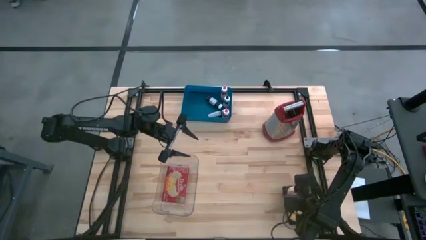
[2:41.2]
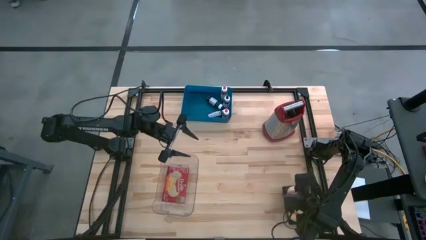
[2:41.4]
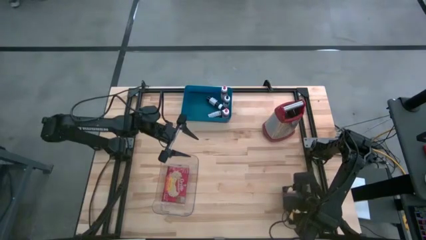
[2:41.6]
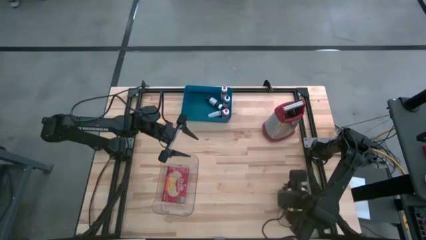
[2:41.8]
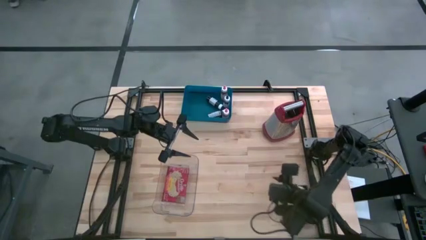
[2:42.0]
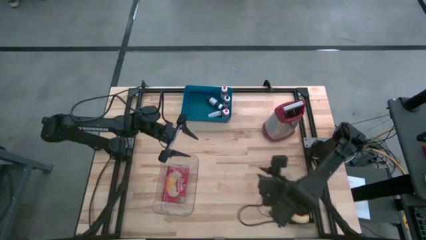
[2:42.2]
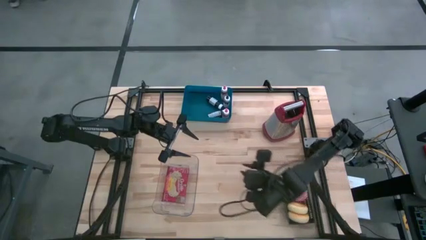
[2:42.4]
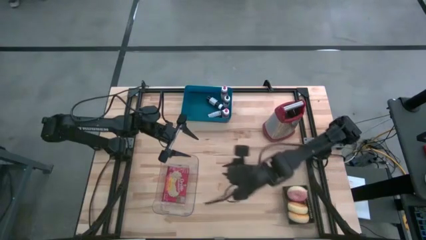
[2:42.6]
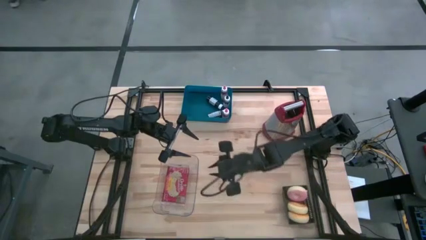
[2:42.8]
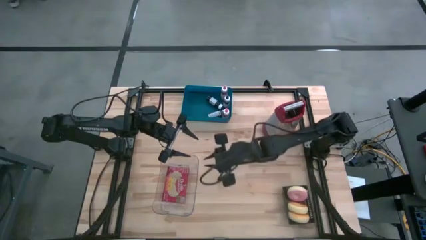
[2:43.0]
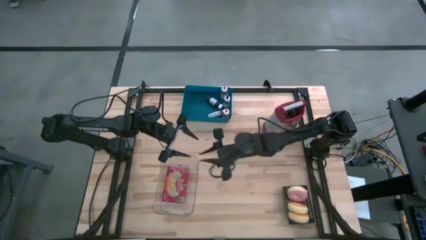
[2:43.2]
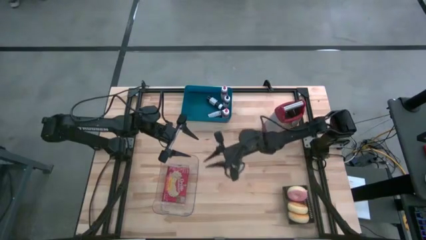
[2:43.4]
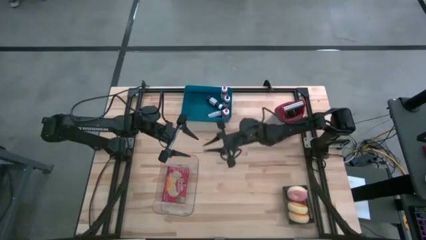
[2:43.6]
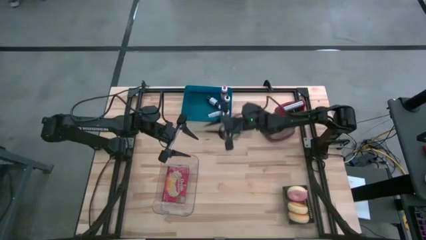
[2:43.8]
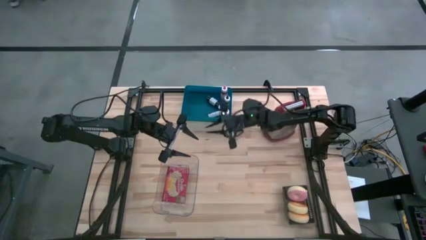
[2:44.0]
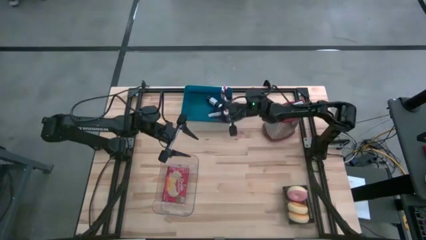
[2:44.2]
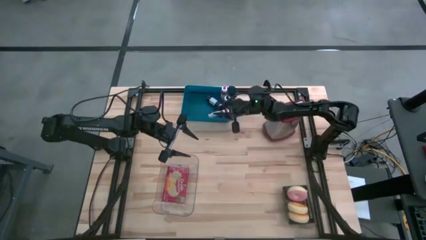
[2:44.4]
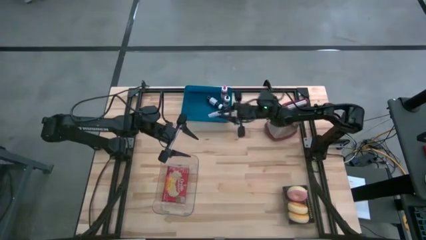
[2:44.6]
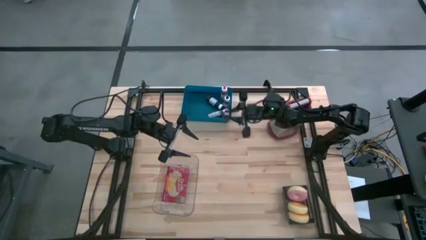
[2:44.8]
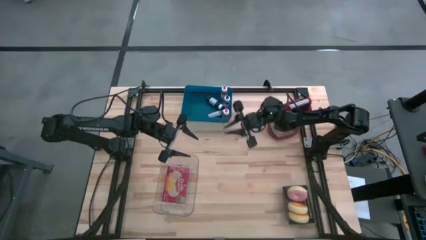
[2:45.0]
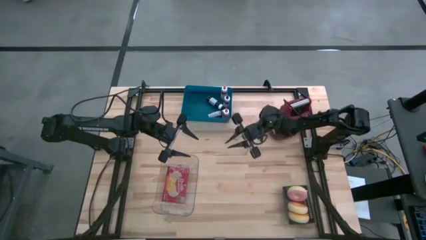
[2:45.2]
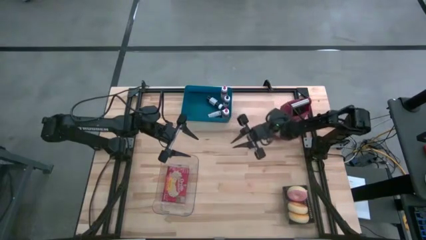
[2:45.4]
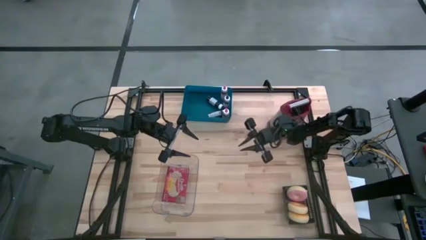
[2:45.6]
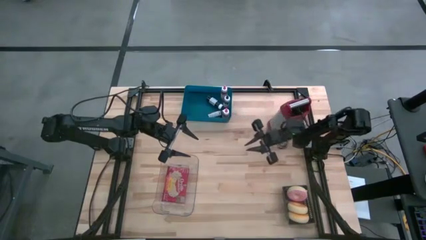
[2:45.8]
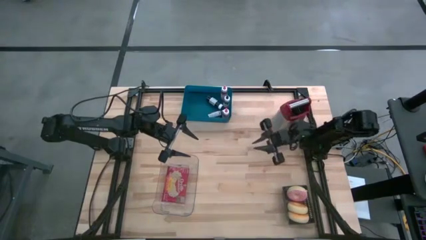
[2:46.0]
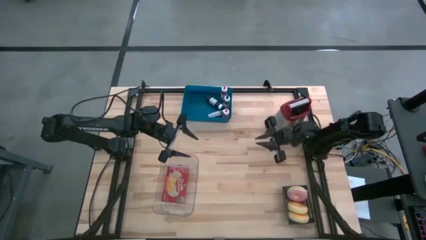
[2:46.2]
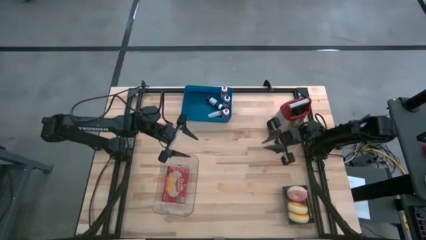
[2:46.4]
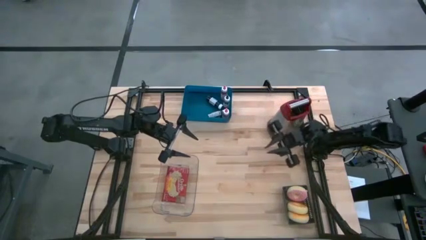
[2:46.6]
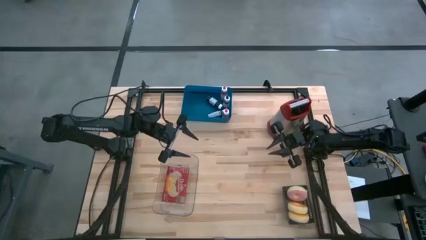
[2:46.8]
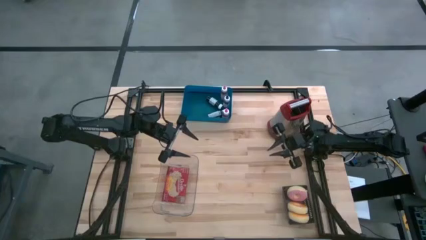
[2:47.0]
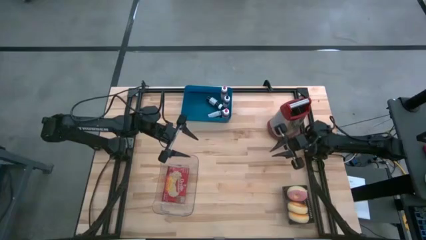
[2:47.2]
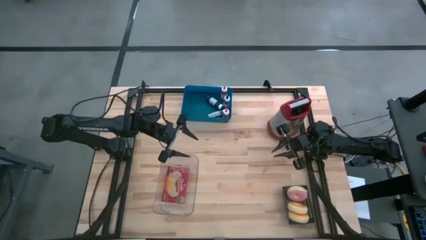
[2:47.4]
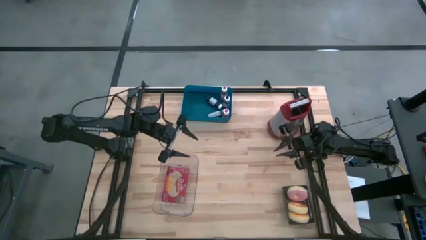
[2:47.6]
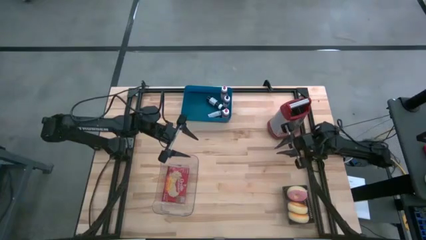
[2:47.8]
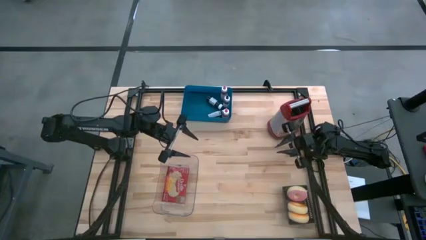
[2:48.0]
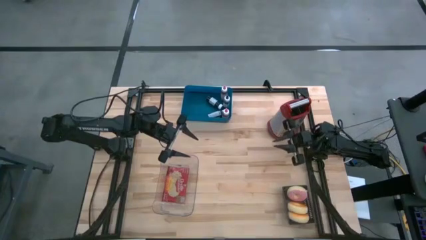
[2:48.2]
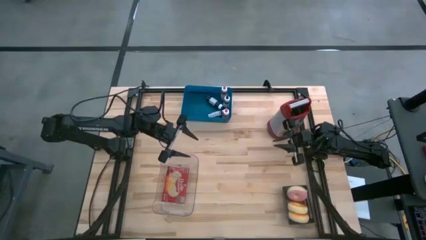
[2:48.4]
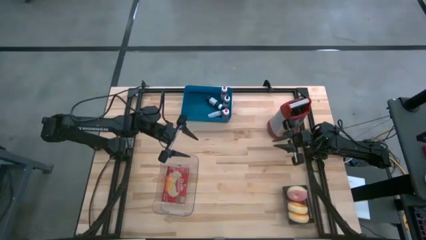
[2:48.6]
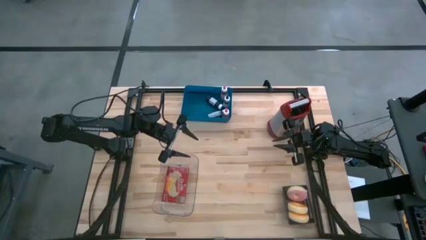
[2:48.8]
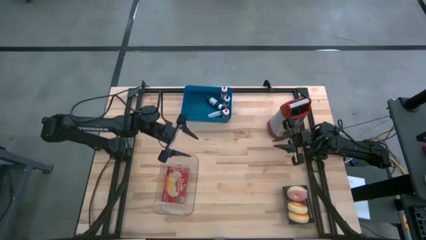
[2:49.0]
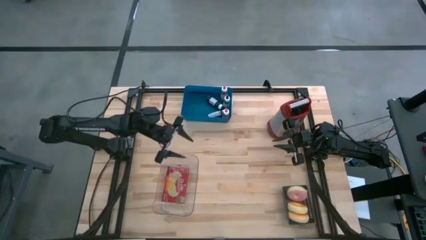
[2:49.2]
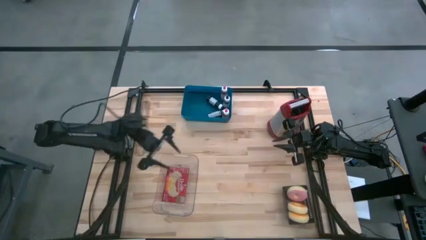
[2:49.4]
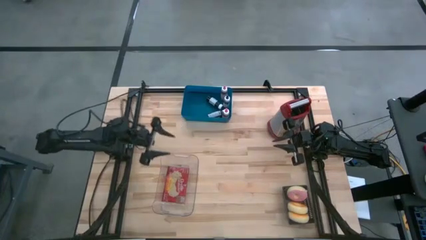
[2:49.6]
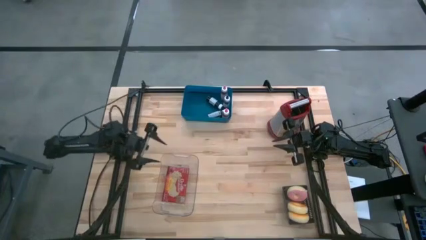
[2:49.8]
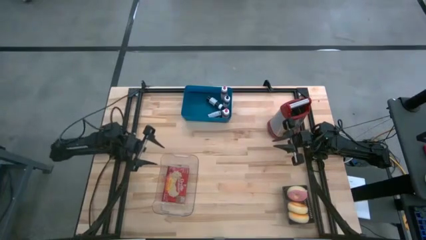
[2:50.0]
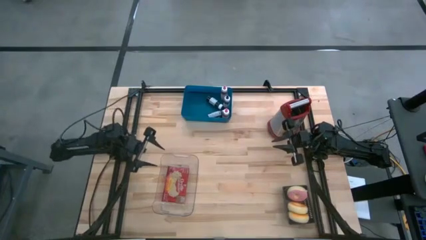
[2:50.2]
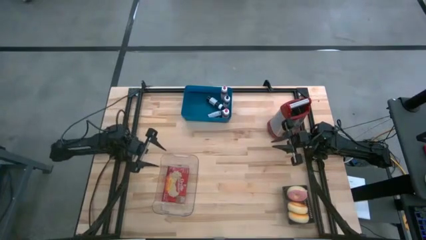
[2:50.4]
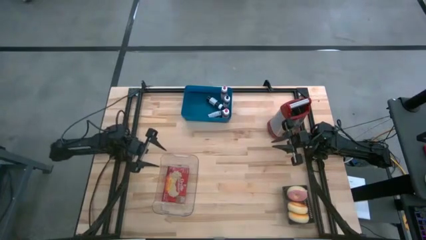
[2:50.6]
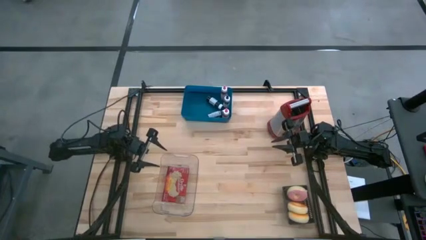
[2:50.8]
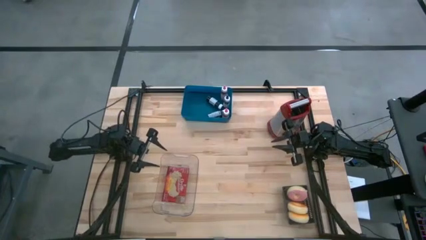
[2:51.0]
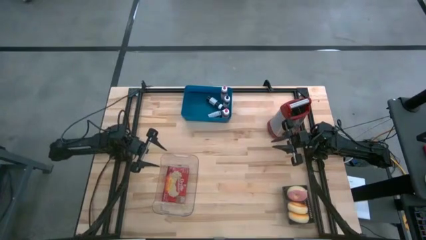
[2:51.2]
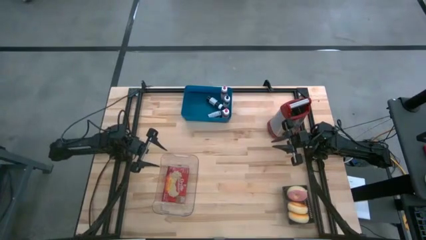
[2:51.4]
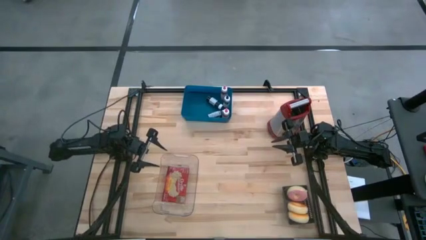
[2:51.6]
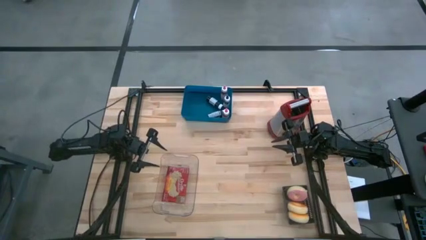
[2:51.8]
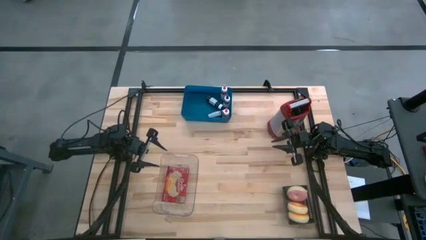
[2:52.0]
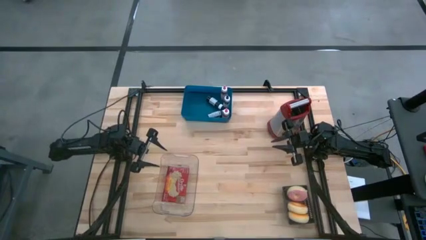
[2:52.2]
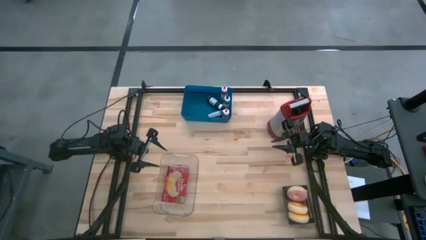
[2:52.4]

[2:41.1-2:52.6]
Task: Pick & Place Food Item
Return to home position
